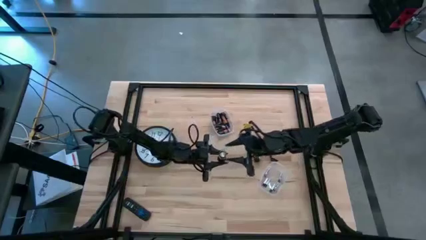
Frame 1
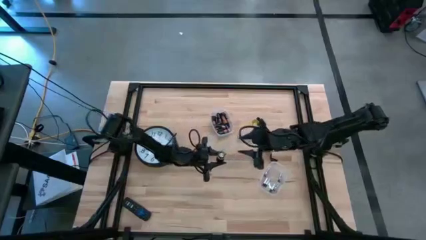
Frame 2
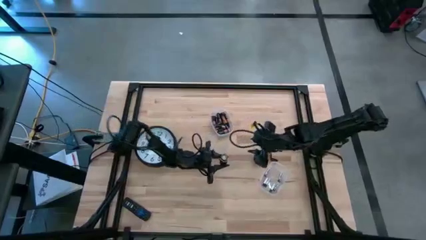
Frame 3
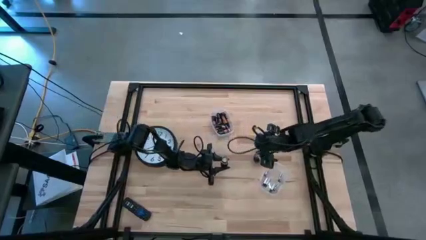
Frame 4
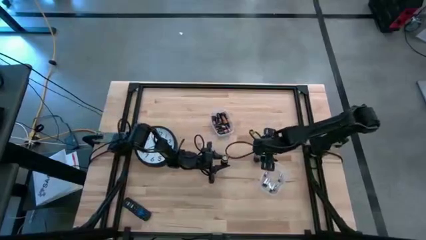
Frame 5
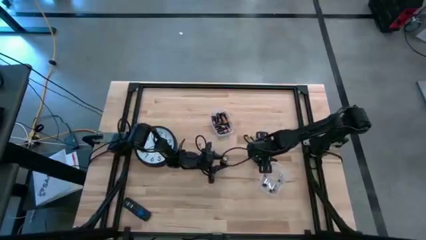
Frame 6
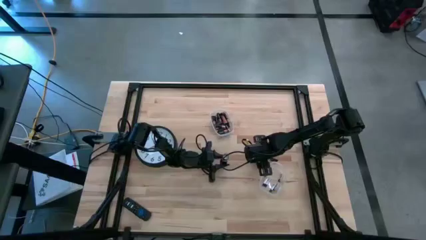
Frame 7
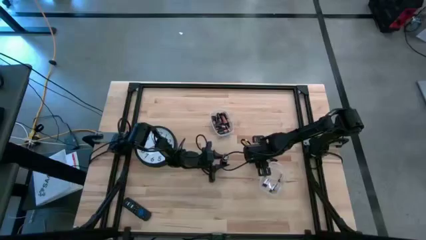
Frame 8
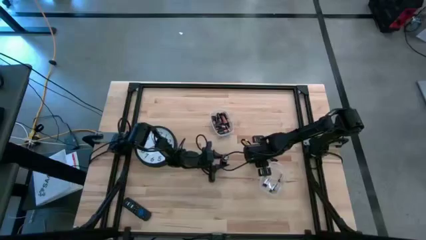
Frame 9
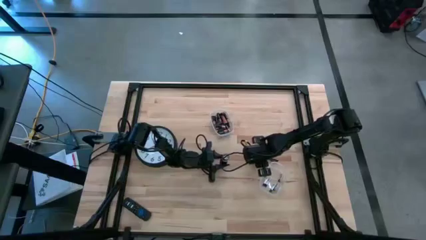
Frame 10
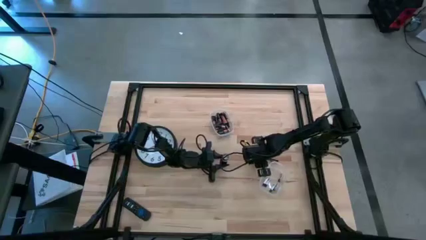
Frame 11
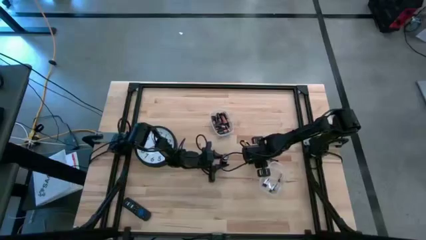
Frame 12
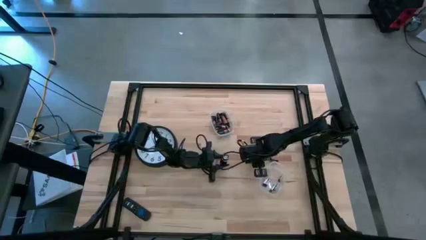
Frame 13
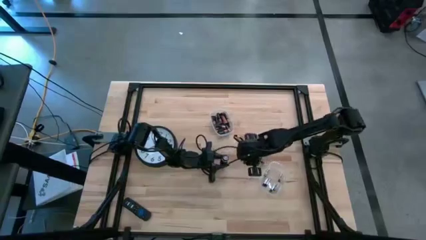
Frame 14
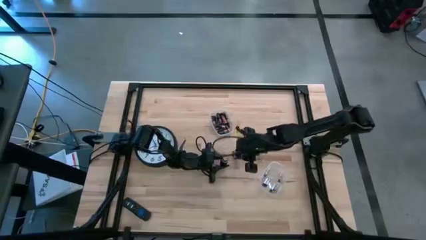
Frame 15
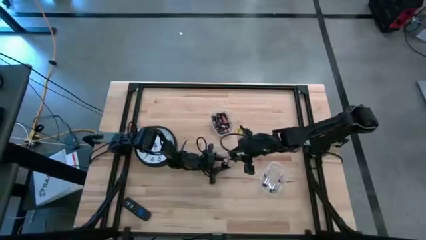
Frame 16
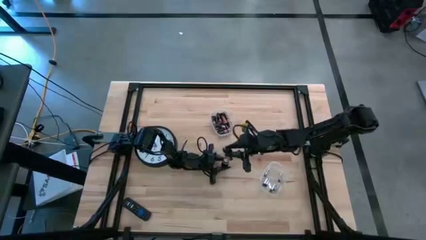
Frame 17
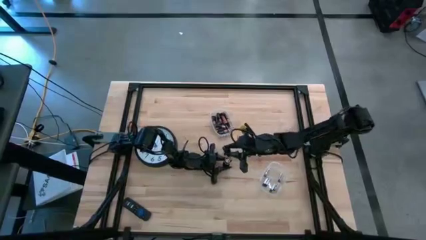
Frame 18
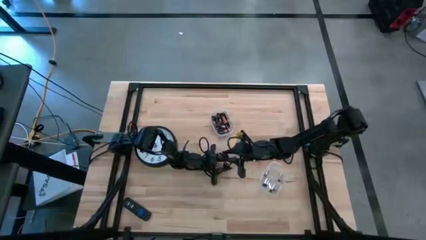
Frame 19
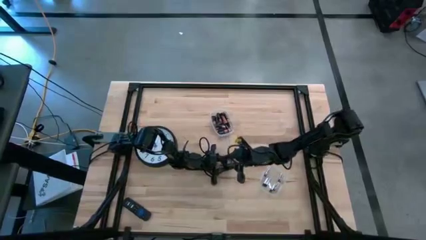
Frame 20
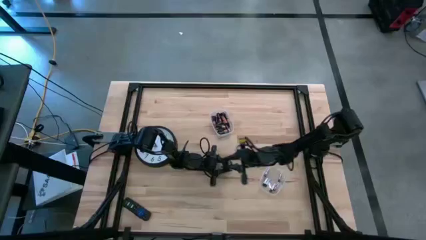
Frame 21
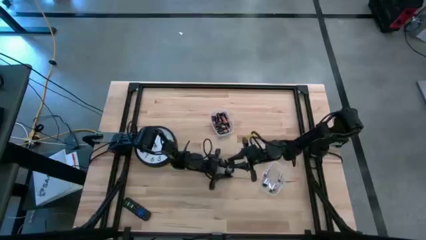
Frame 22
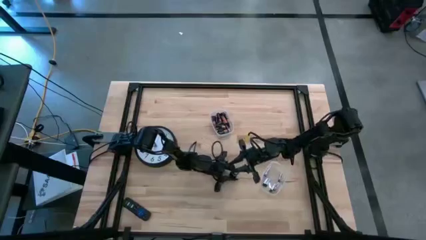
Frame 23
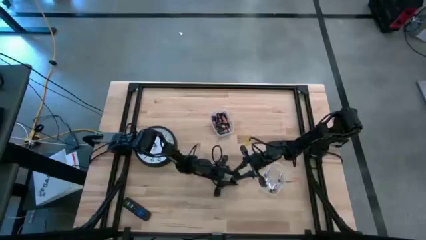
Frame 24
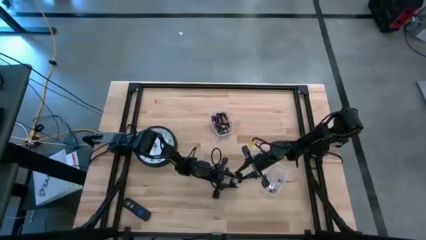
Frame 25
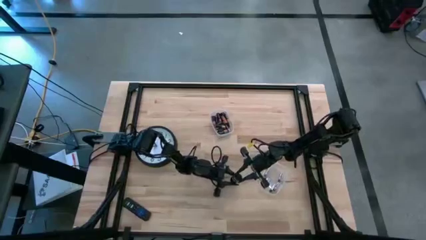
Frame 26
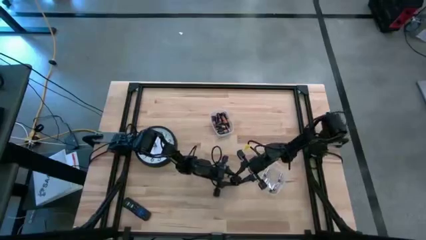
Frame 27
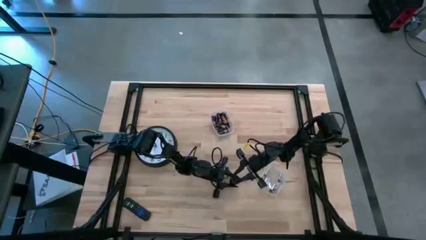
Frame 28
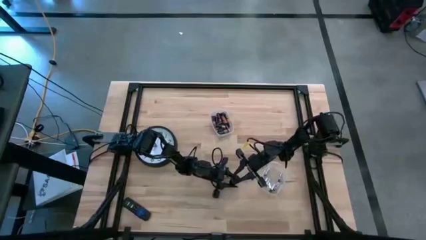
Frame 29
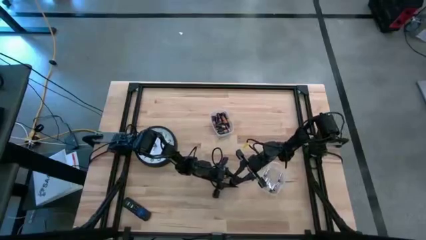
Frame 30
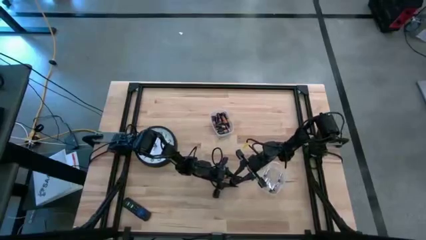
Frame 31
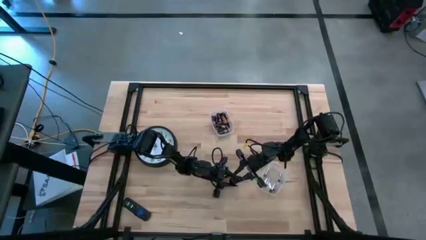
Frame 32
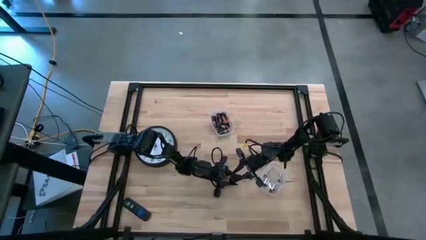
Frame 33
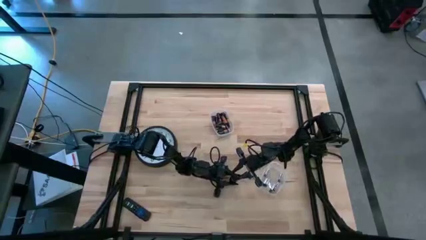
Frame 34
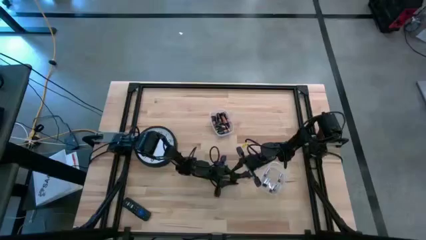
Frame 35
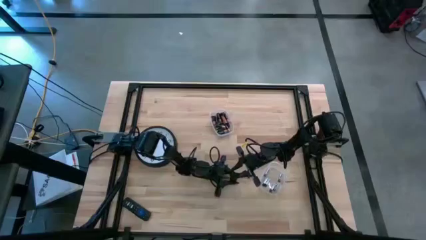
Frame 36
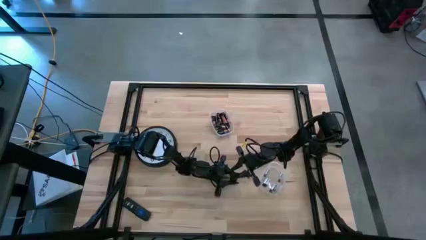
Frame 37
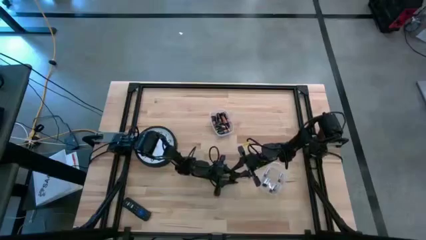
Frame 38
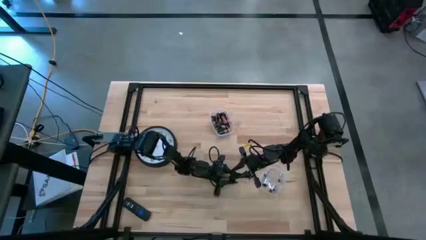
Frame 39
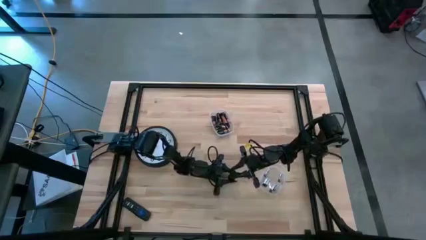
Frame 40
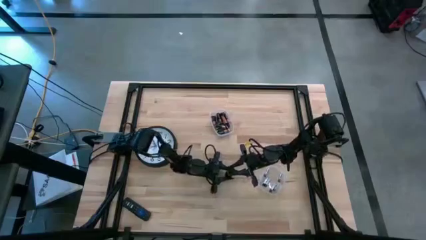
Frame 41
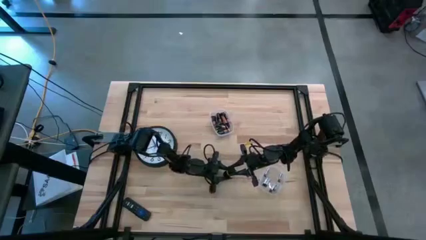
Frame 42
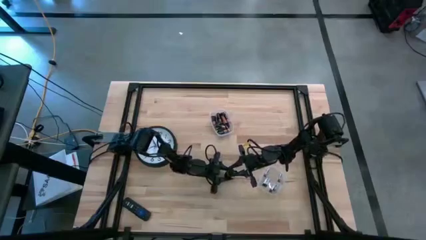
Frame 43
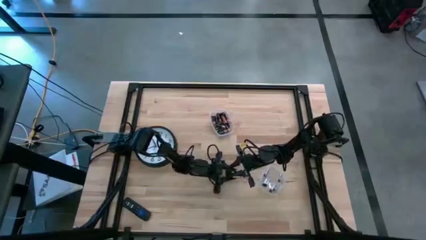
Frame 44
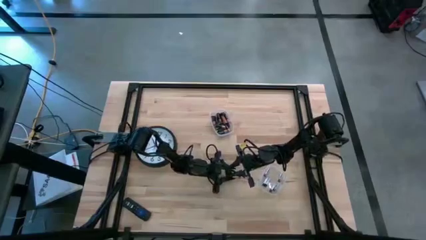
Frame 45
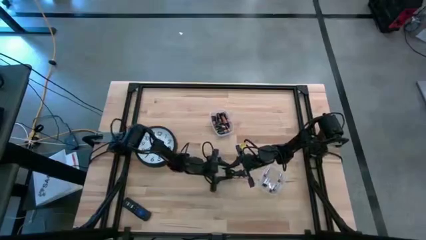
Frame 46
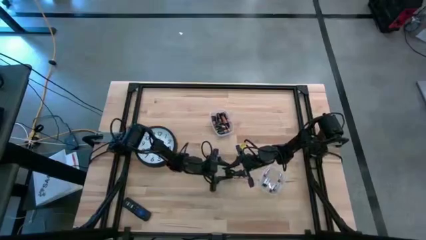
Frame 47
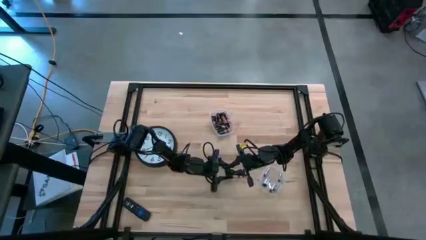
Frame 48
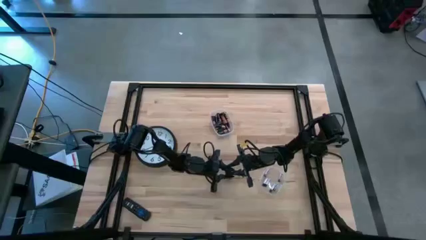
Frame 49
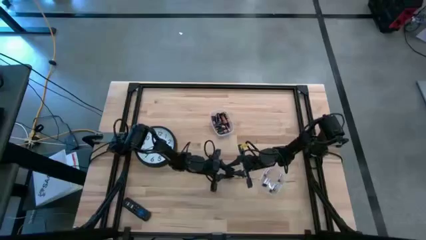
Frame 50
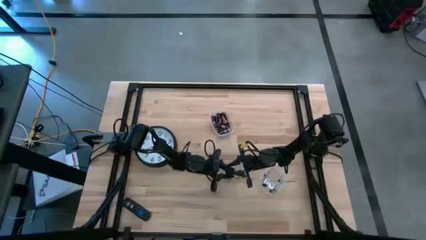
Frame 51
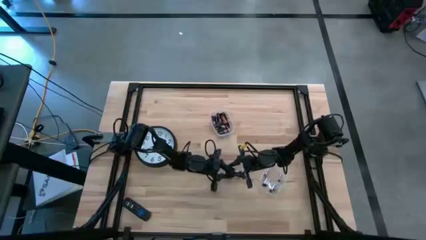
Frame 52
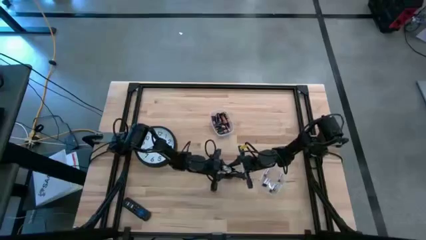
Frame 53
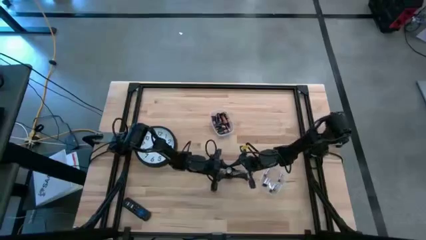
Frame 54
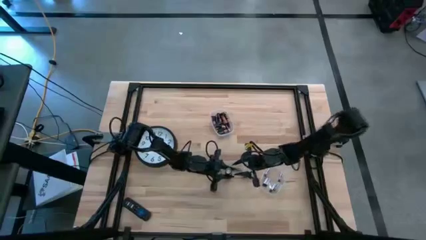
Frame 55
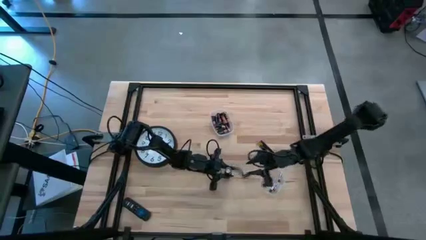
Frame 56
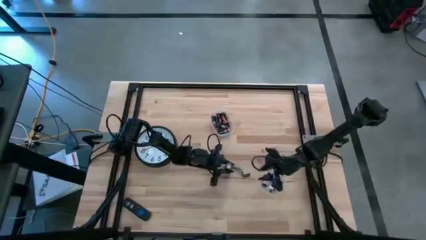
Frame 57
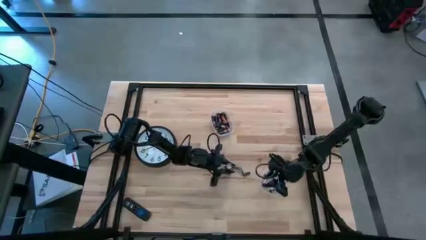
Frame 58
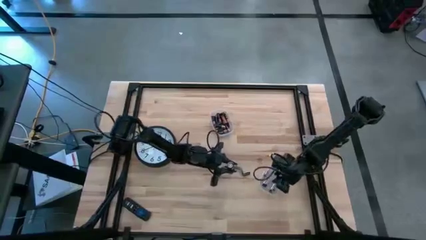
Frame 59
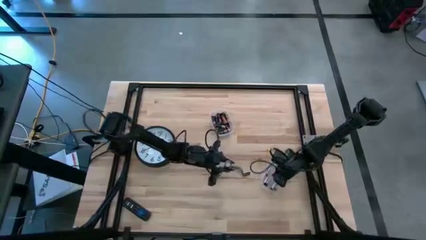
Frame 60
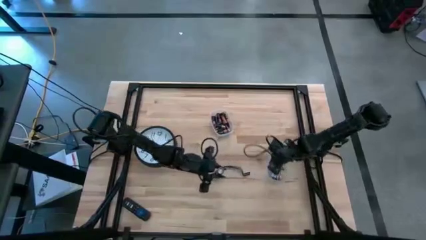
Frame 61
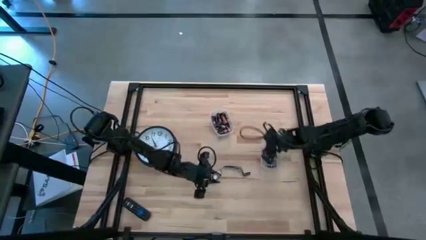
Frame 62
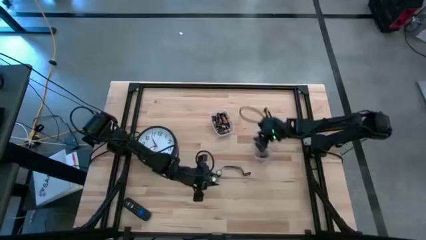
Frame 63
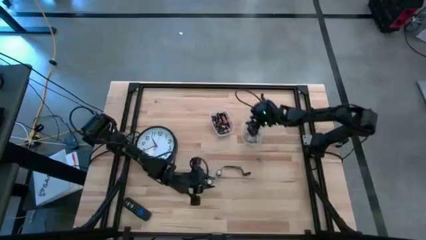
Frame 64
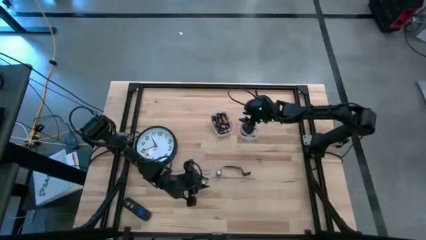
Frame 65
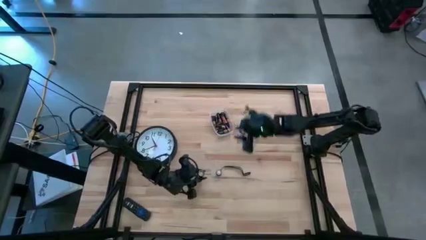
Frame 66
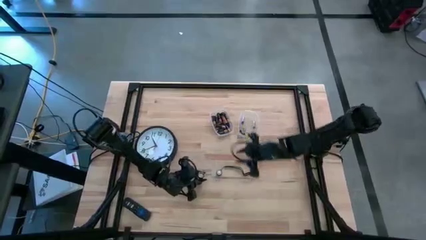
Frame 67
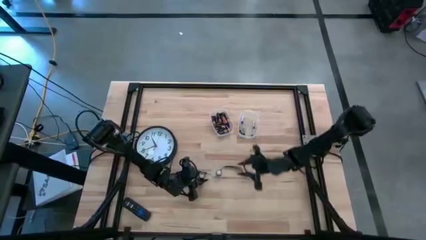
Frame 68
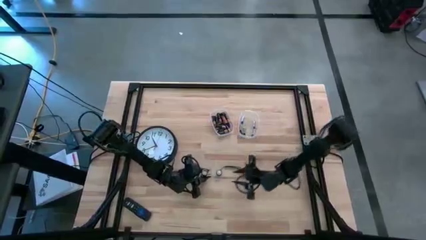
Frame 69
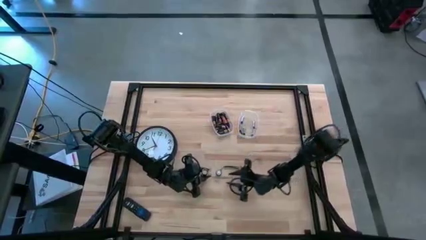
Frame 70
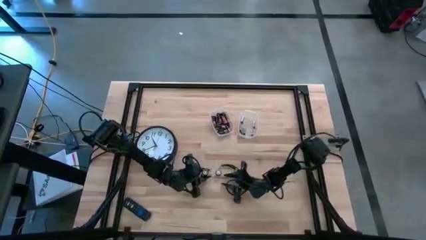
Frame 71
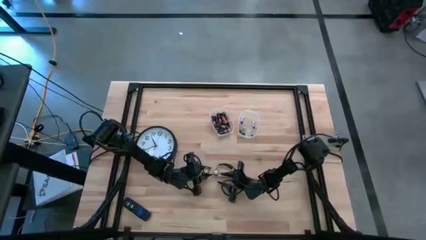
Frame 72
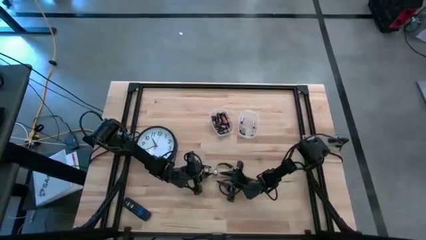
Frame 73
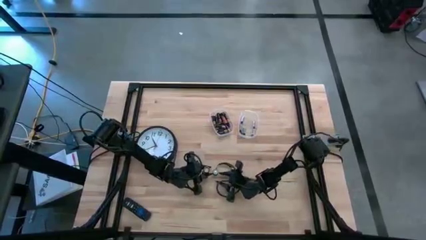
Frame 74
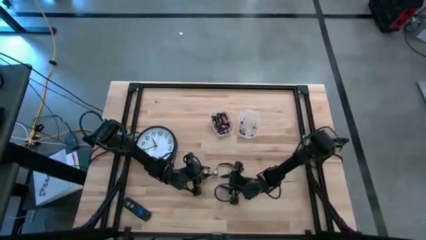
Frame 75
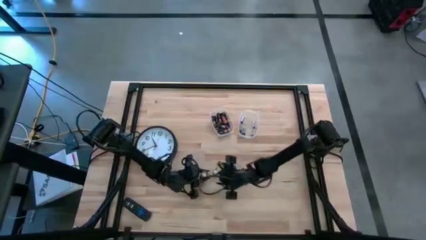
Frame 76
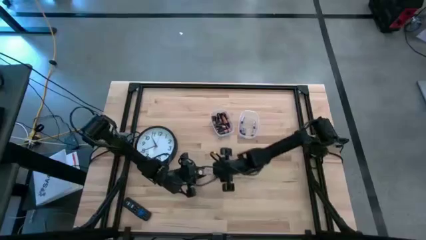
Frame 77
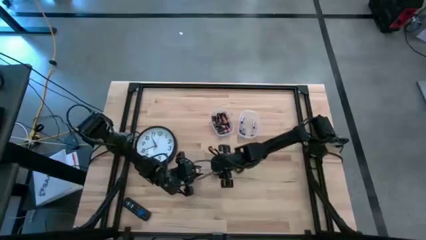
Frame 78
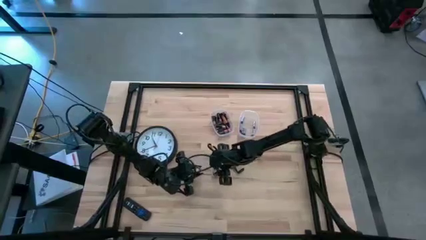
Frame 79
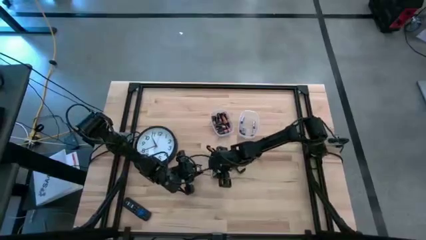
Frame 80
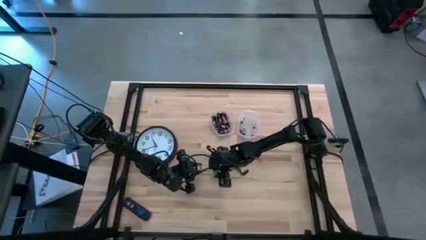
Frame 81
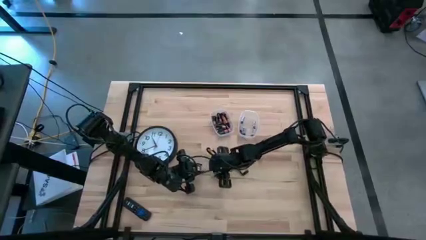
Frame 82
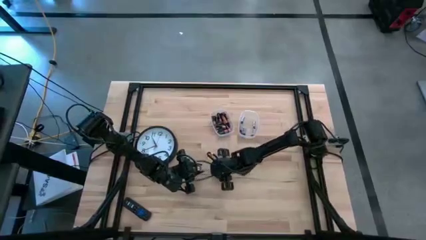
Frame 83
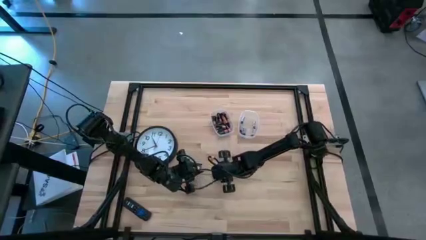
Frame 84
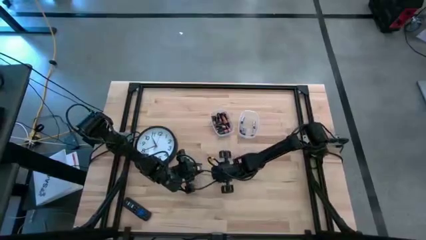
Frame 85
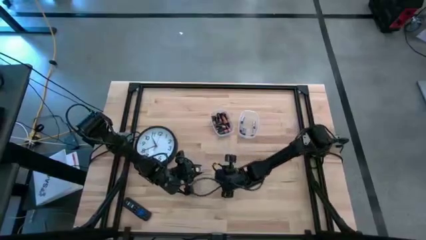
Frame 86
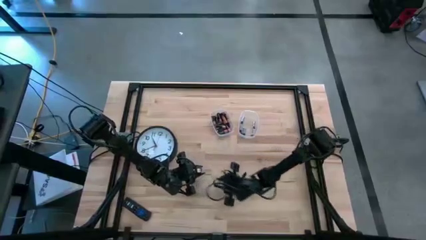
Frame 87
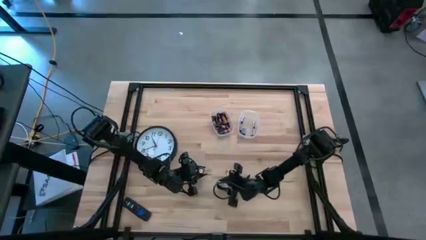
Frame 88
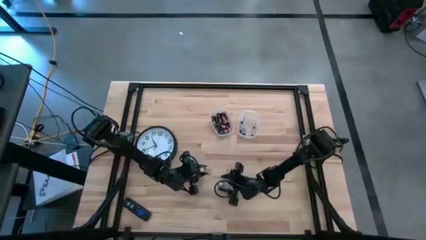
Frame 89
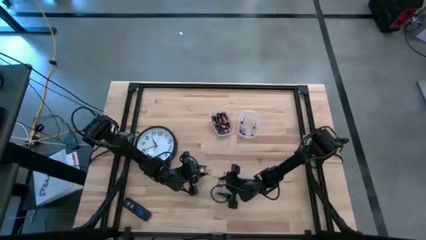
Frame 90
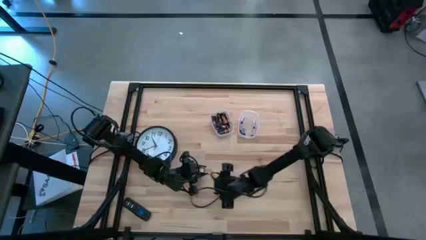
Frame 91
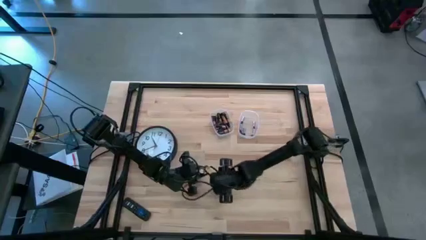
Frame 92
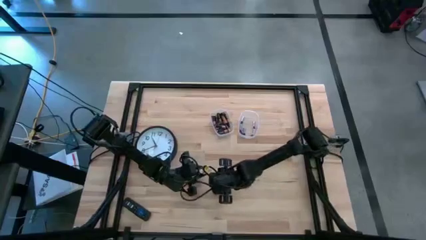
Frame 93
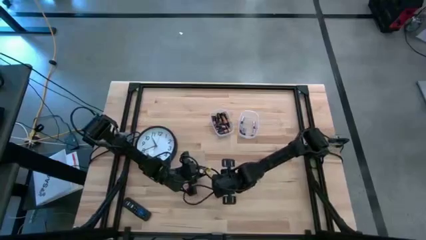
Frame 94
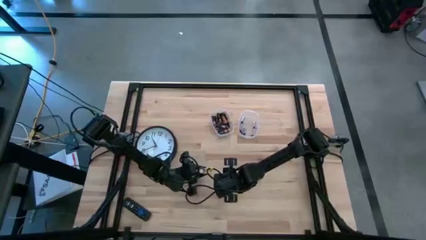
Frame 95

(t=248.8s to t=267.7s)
Task: Insert battery
Close the lid of the black flashlight
